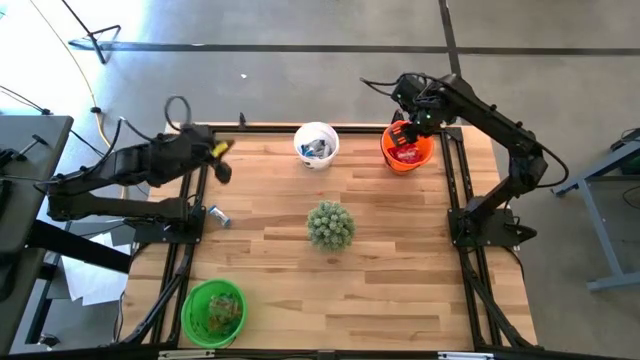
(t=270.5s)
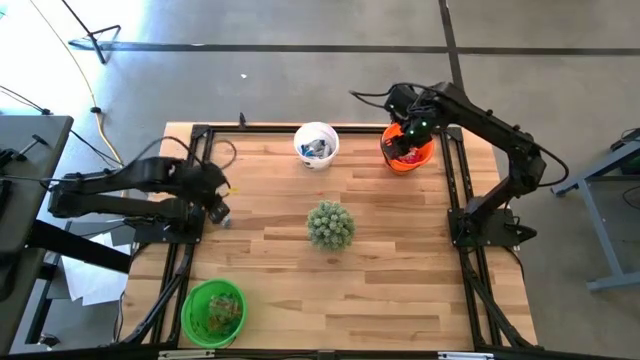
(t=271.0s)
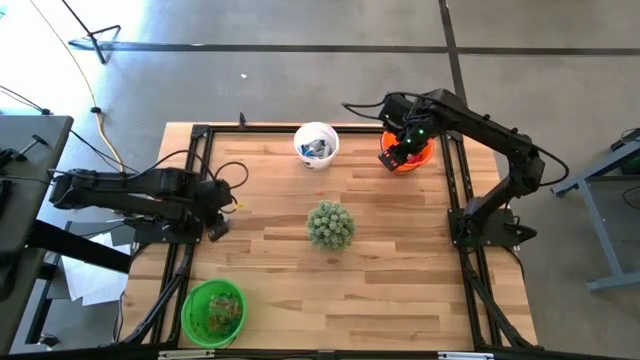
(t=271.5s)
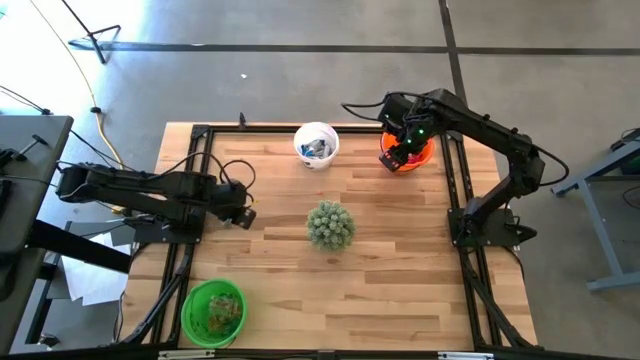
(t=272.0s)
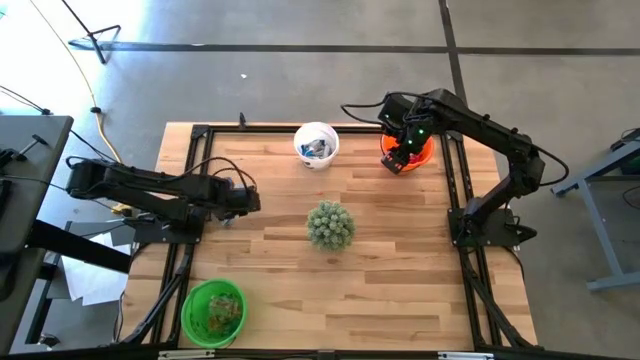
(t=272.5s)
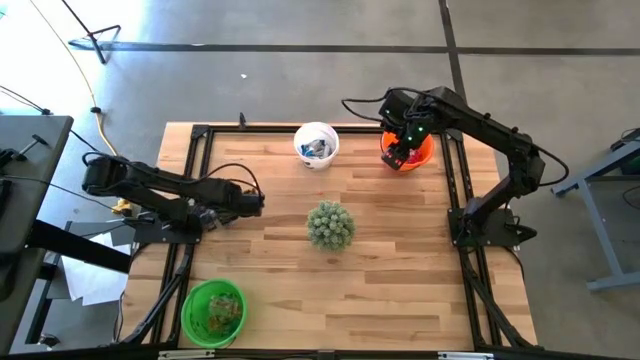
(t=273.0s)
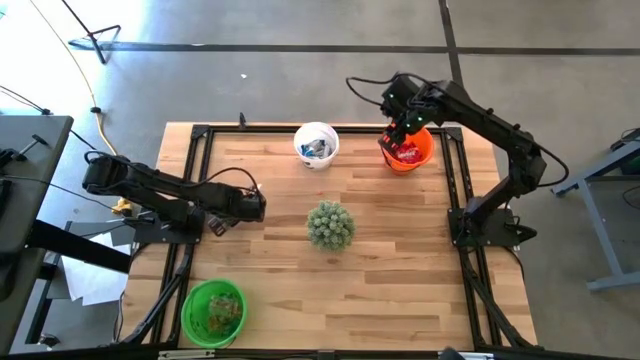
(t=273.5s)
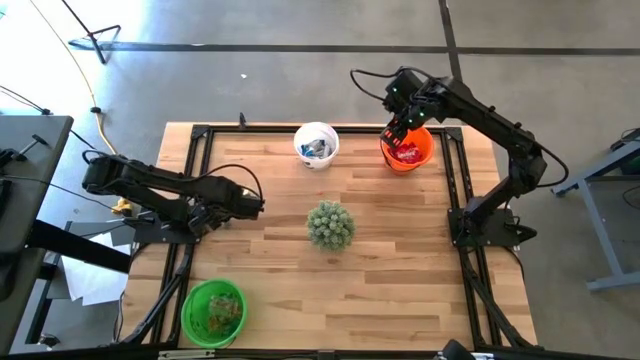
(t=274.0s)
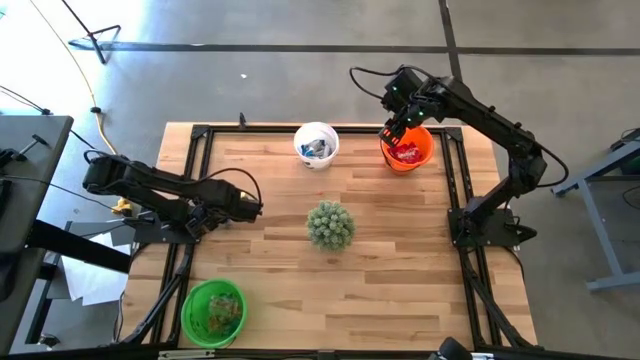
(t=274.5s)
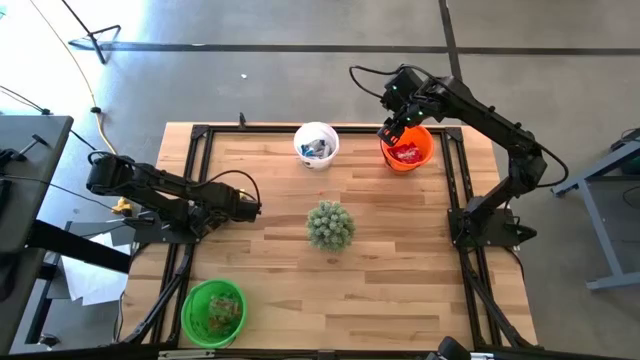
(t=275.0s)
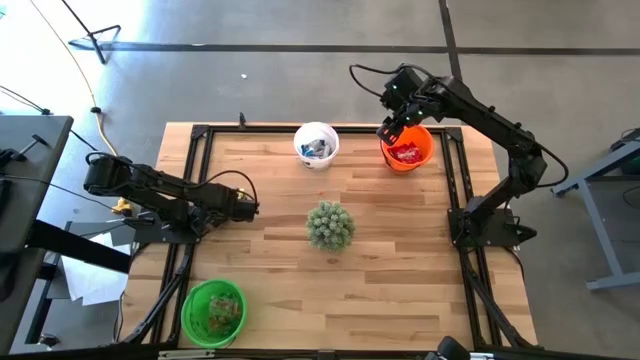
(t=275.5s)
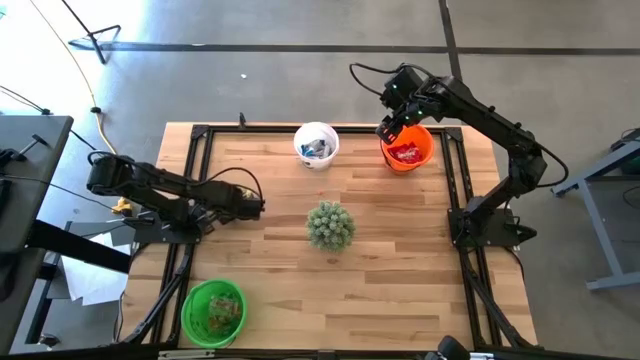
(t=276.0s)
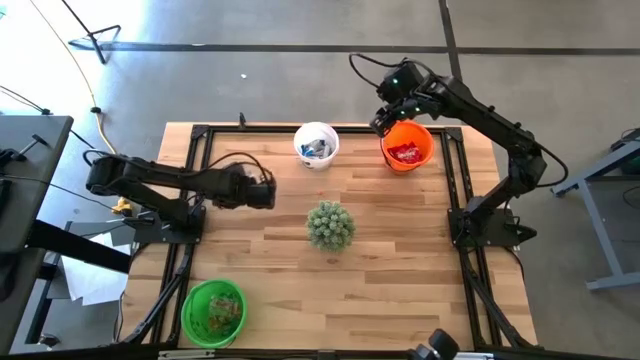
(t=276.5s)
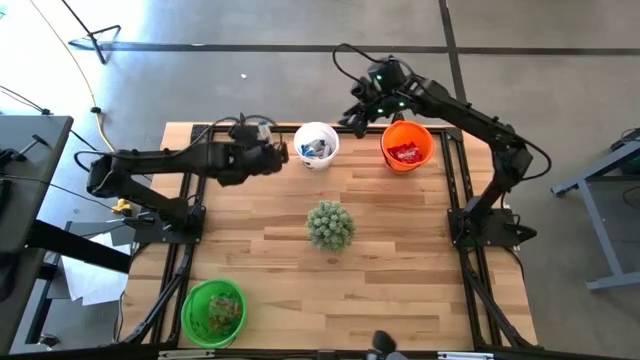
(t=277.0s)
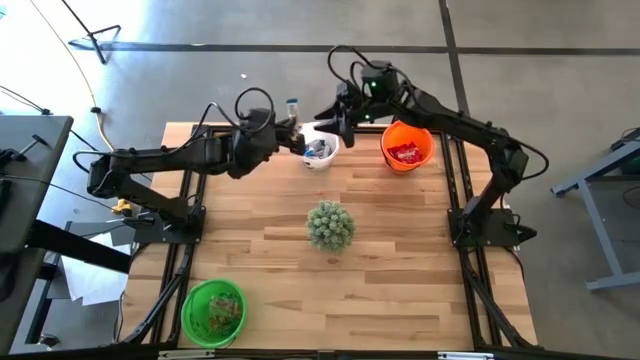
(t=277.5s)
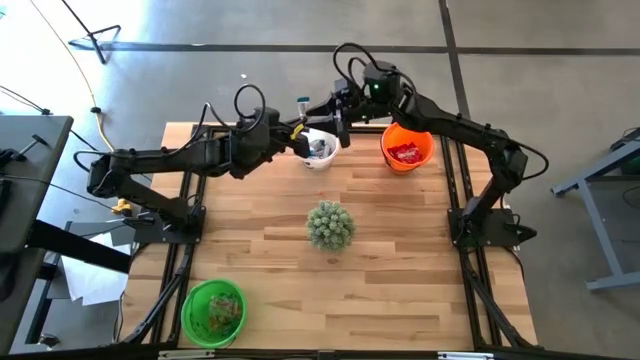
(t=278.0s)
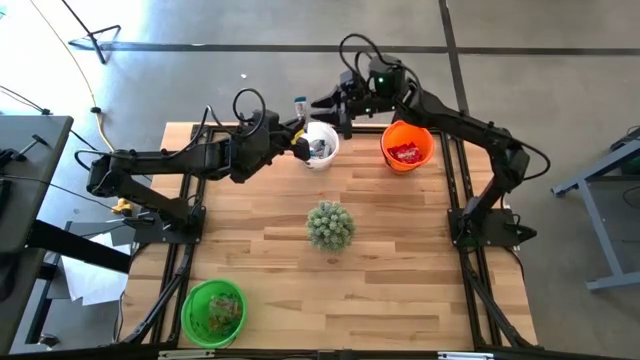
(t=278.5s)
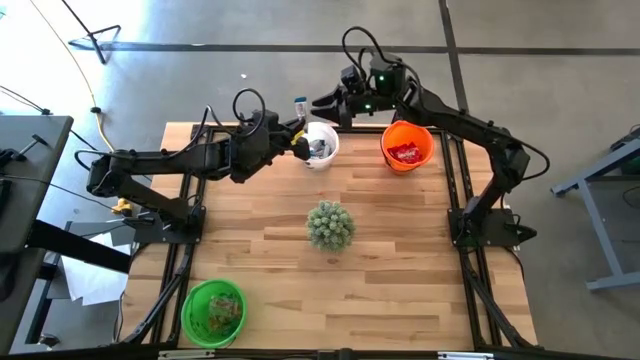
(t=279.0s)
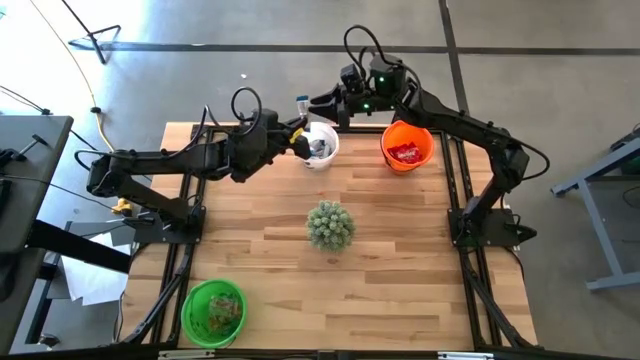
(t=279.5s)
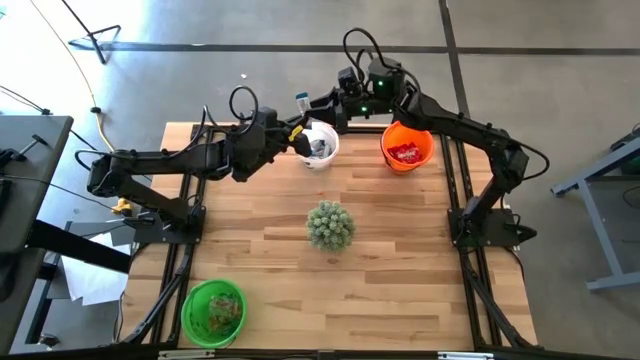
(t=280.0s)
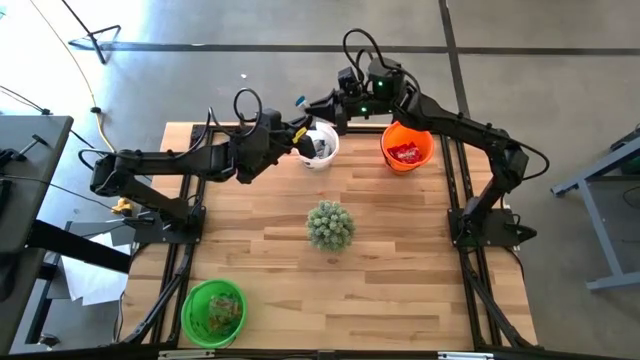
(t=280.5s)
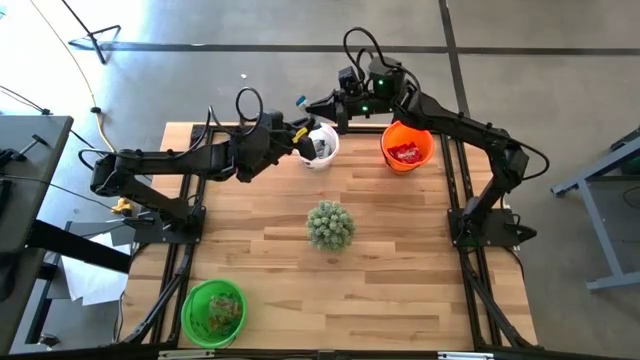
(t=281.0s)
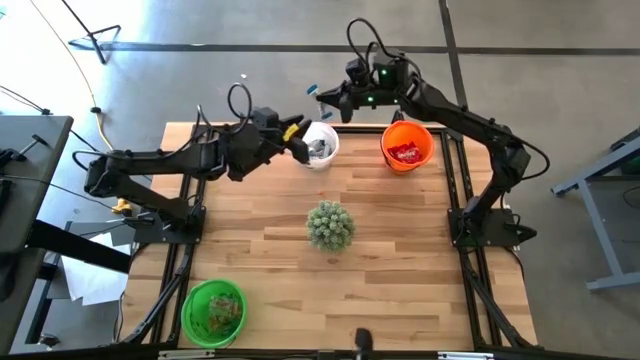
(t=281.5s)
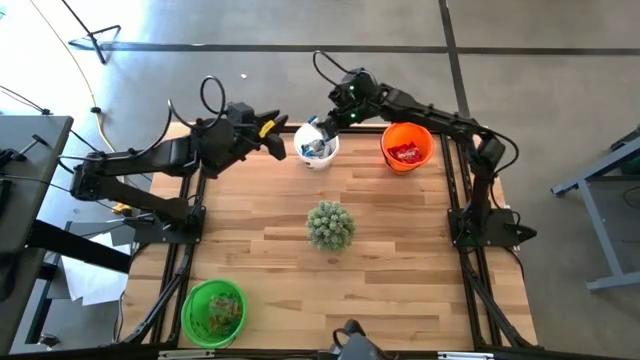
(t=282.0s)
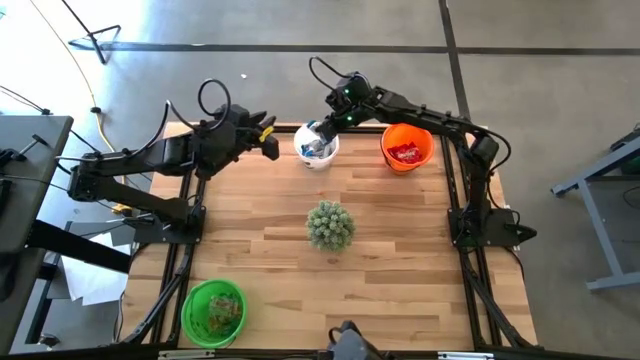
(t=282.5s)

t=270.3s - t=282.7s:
Task: Sort candy
Put the white chocolate into the white bucket

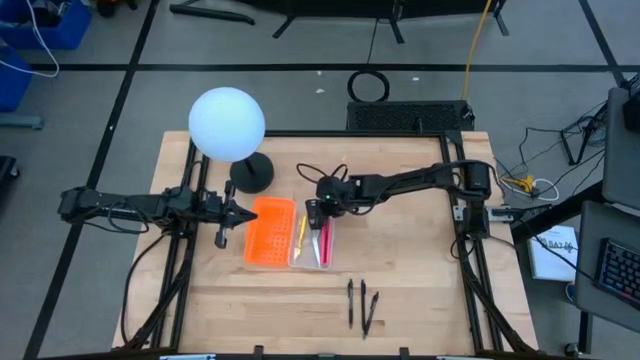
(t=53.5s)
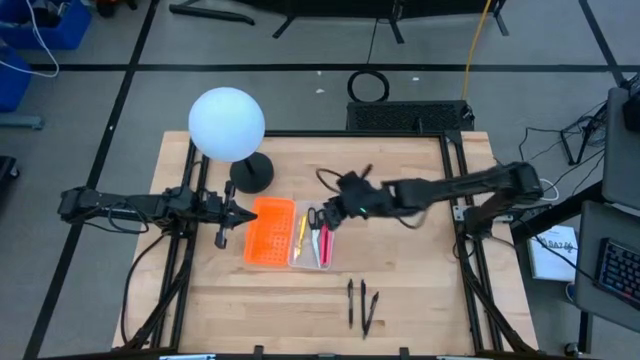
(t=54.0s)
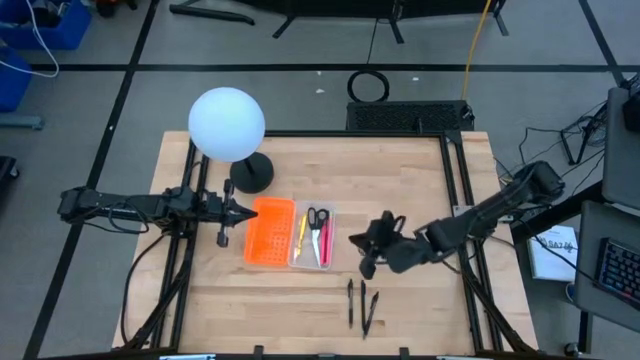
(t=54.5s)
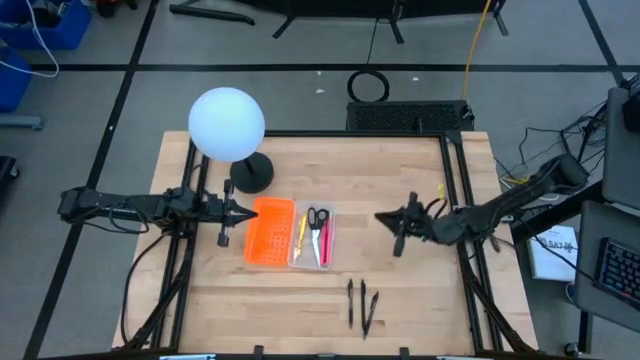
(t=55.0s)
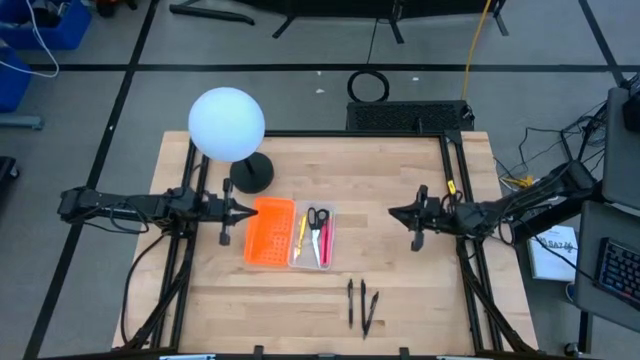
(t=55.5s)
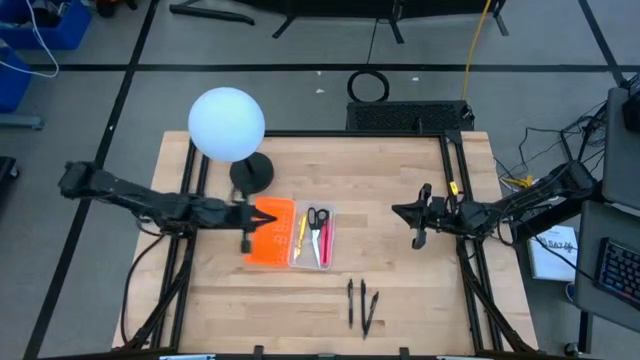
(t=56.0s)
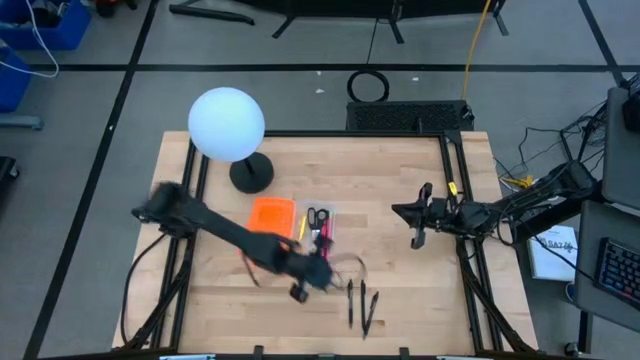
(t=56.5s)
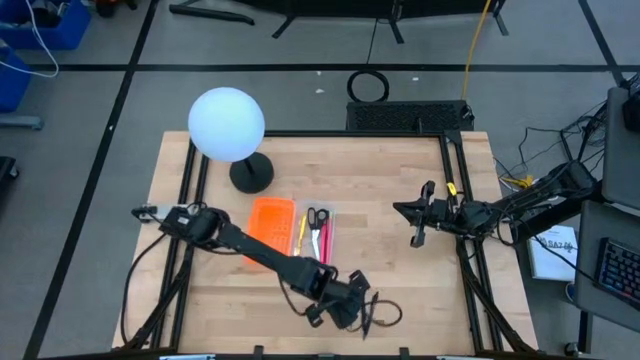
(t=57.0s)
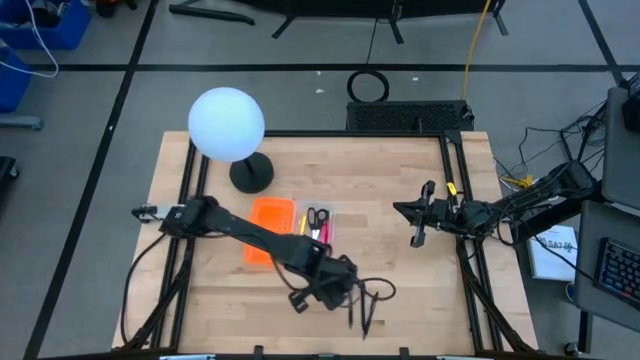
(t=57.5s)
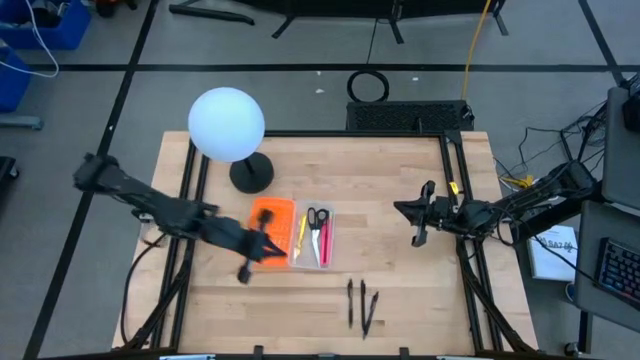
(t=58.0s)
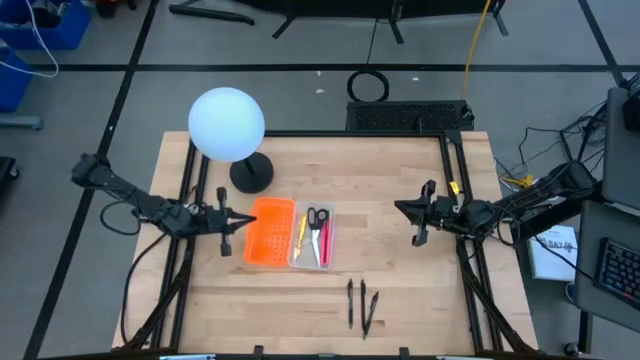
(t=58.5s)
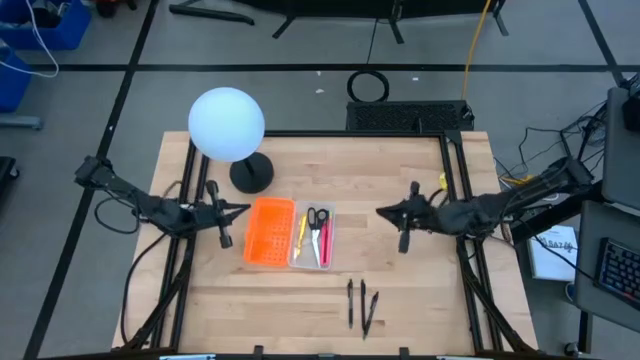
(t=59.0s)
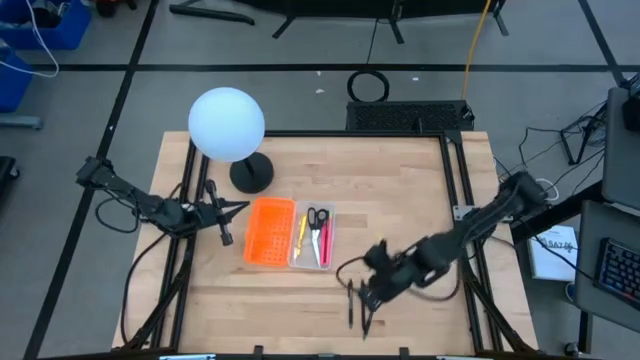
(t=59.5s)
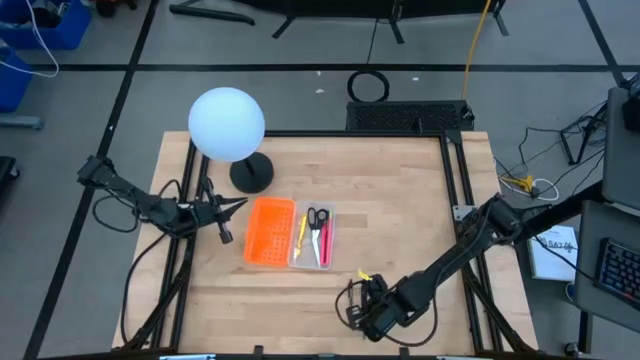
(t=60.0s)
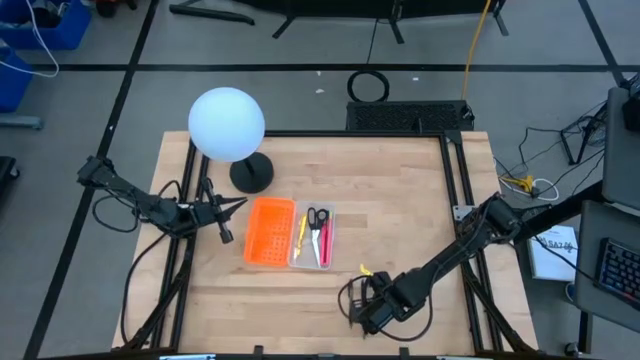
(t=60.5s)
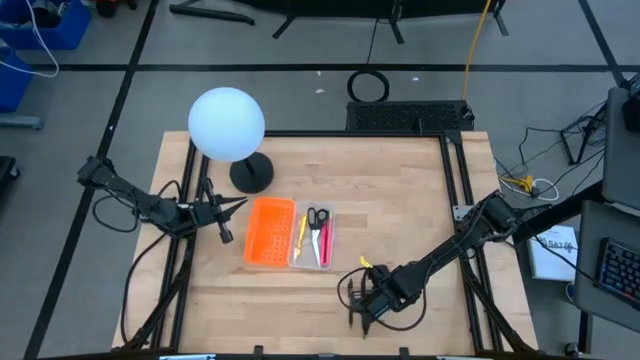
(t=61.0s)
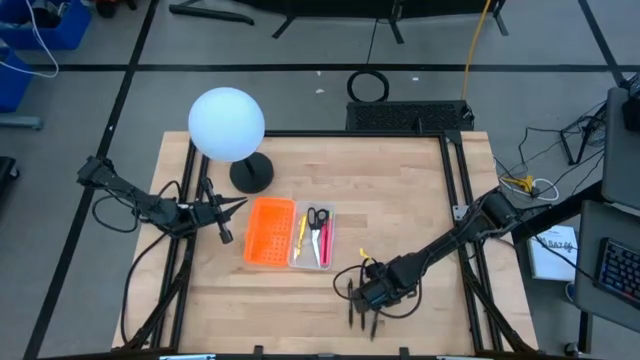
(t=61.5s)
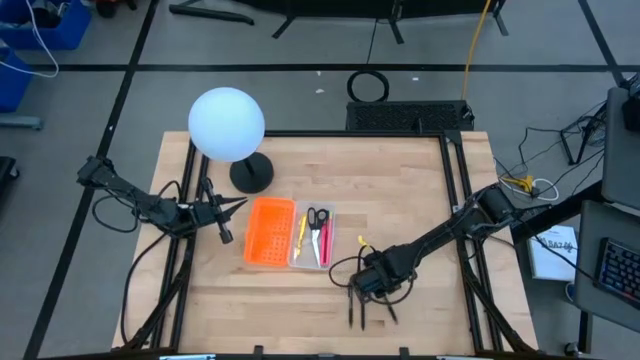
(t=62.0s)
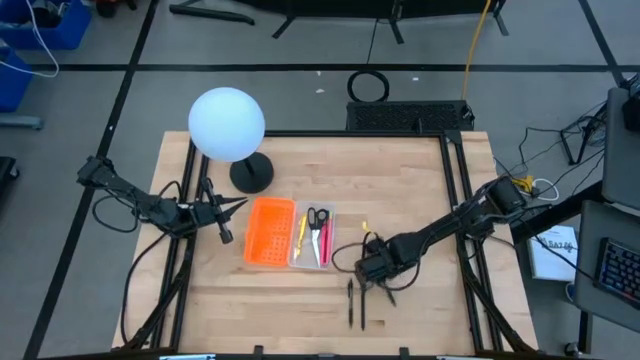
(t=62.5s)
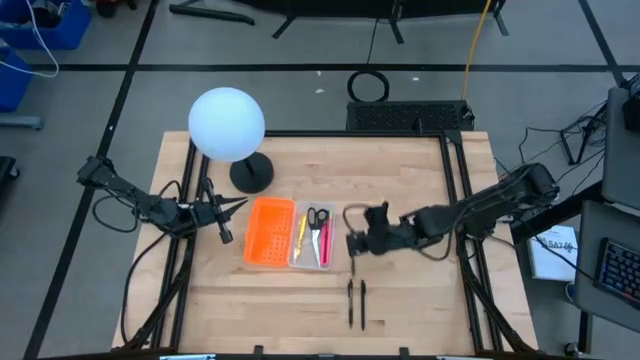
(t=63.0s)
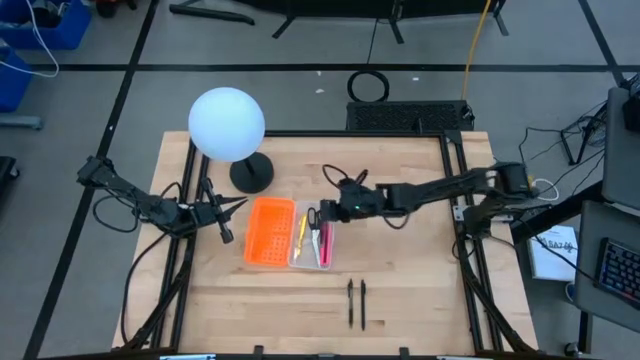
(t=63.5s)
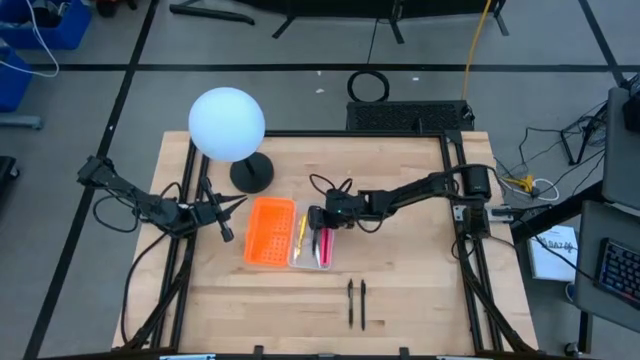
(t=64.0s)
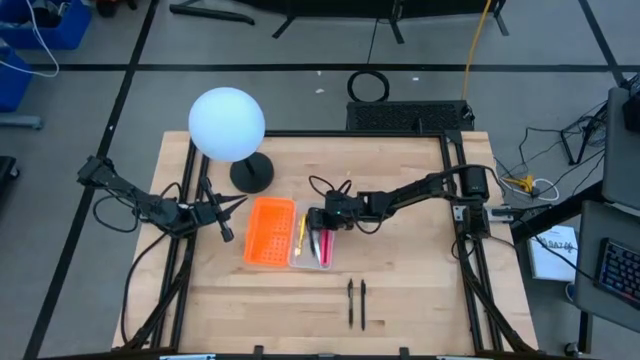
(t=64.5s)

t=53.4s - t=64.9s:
Task: Pick & place school supplies into a supply box
Put the right black pen into the supply box
